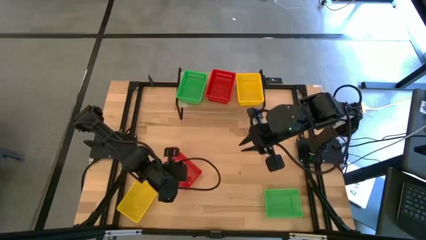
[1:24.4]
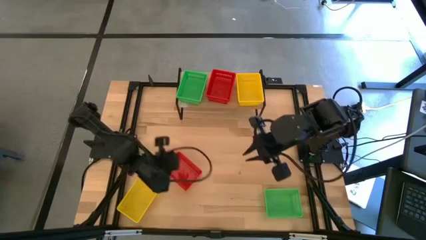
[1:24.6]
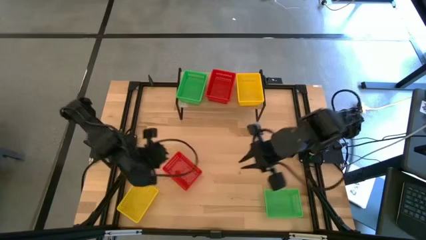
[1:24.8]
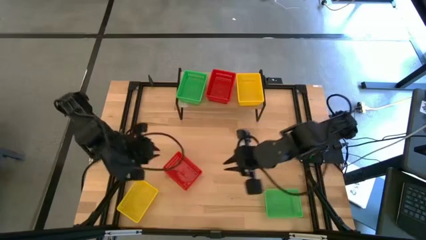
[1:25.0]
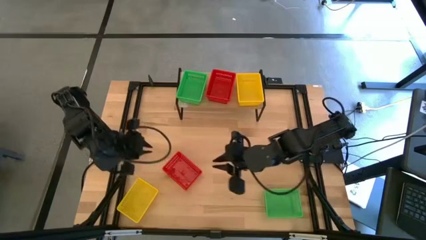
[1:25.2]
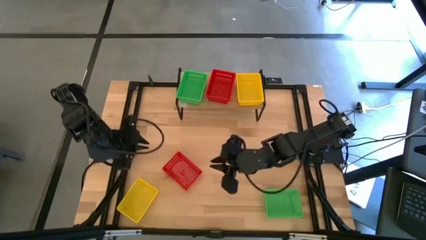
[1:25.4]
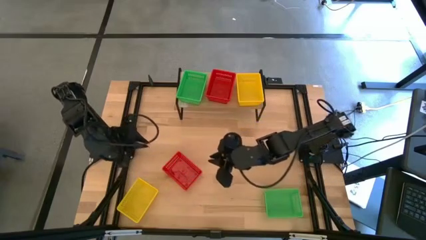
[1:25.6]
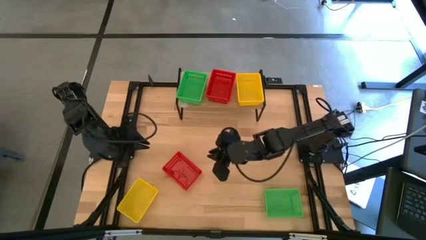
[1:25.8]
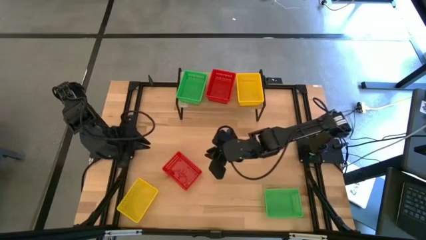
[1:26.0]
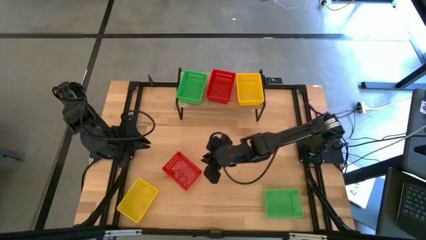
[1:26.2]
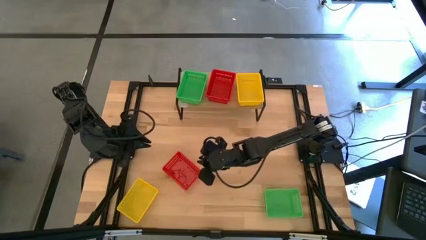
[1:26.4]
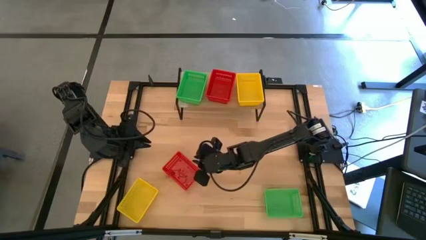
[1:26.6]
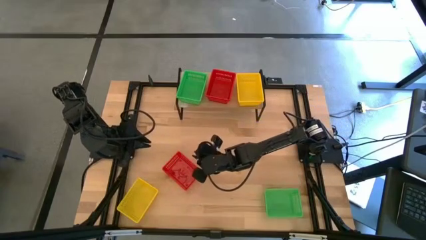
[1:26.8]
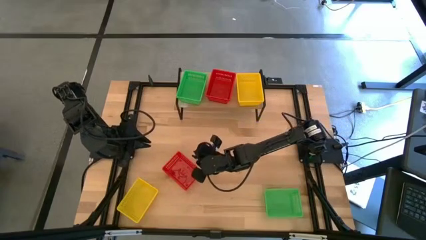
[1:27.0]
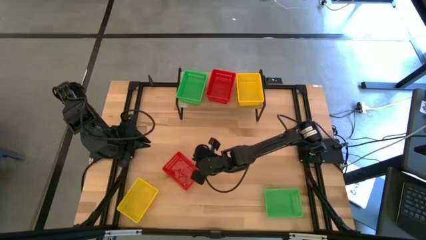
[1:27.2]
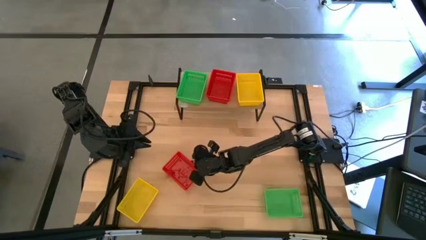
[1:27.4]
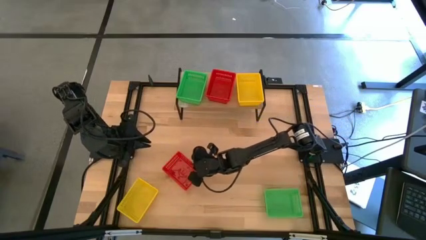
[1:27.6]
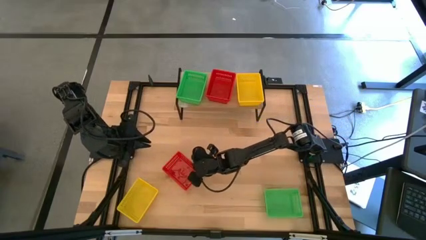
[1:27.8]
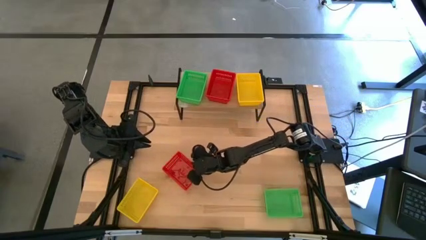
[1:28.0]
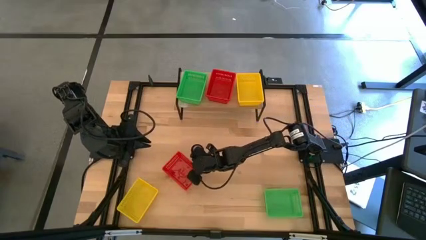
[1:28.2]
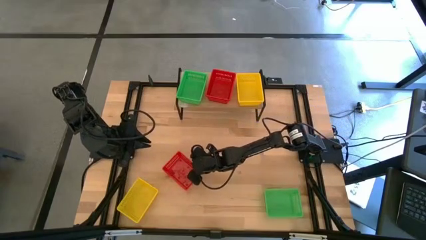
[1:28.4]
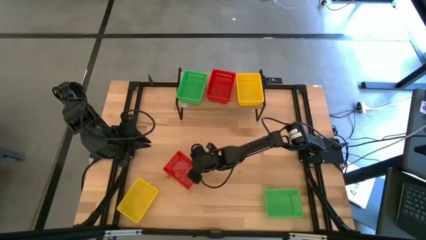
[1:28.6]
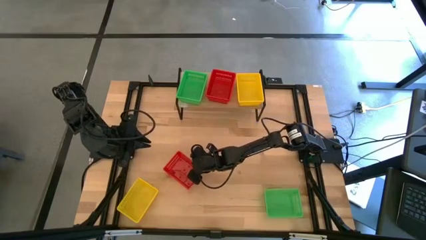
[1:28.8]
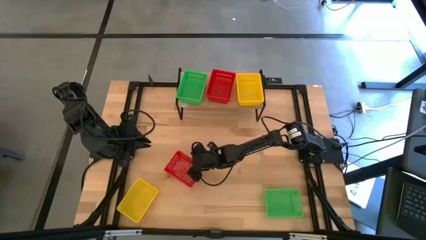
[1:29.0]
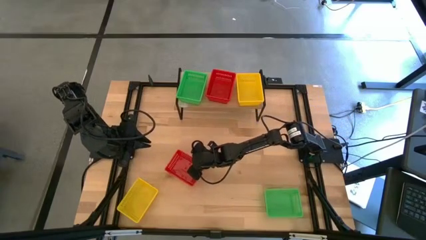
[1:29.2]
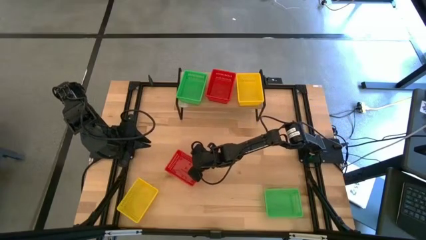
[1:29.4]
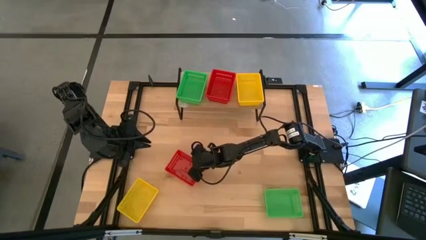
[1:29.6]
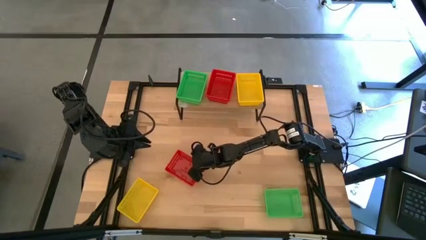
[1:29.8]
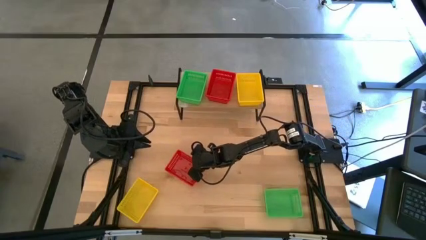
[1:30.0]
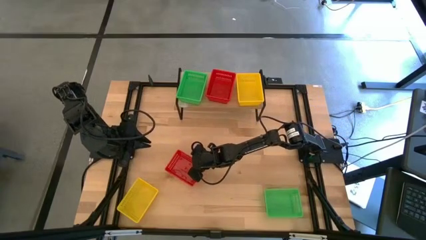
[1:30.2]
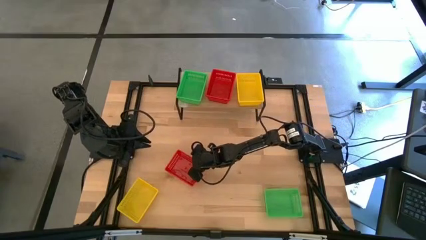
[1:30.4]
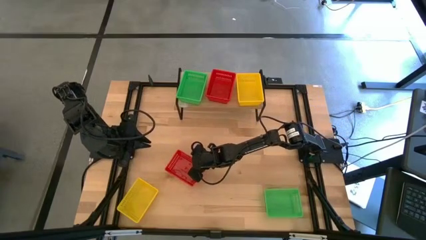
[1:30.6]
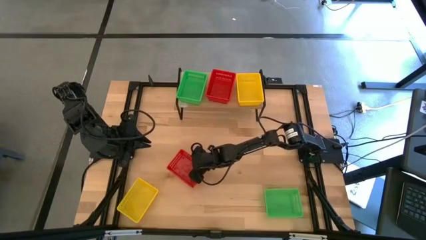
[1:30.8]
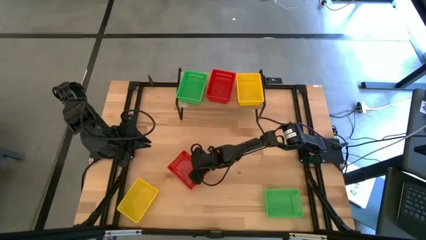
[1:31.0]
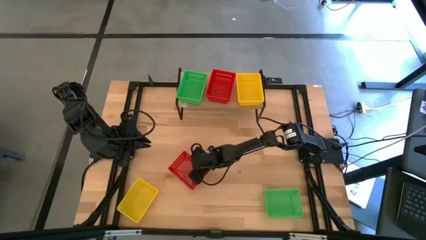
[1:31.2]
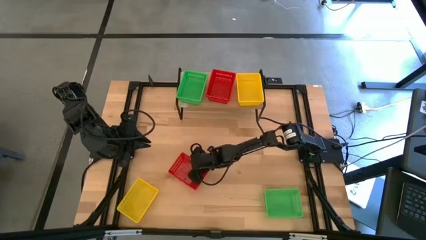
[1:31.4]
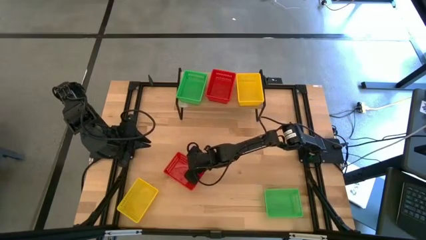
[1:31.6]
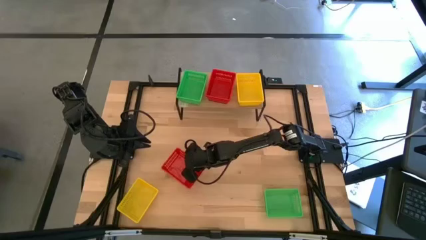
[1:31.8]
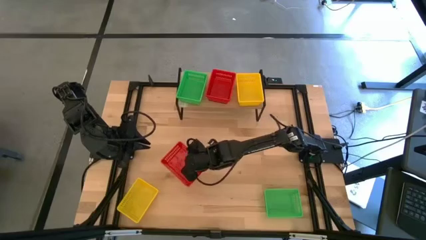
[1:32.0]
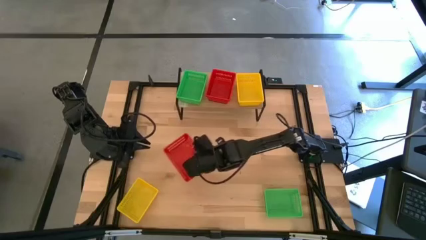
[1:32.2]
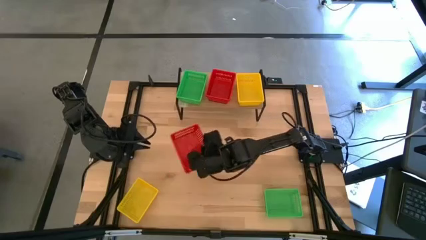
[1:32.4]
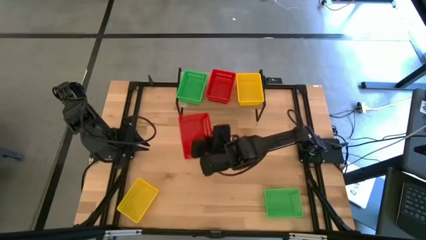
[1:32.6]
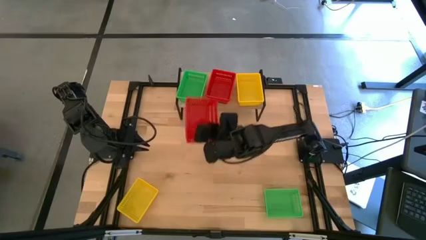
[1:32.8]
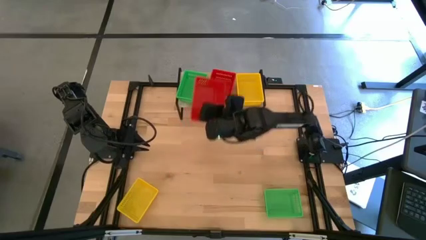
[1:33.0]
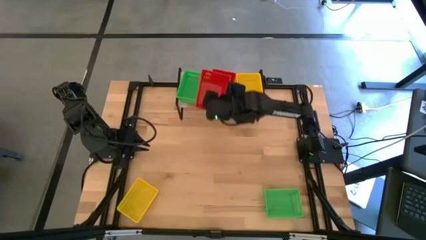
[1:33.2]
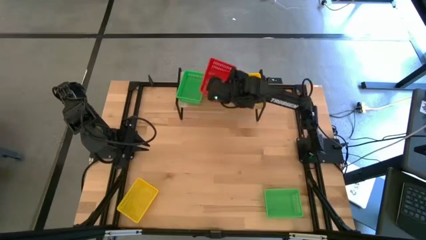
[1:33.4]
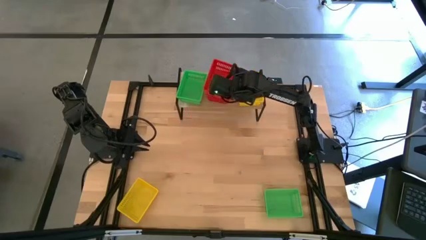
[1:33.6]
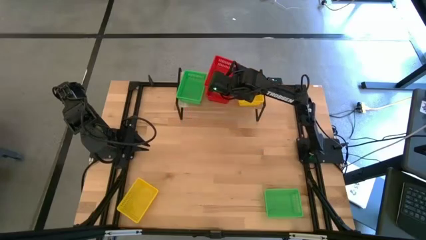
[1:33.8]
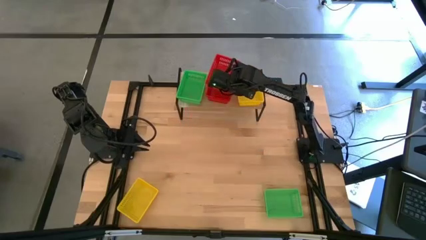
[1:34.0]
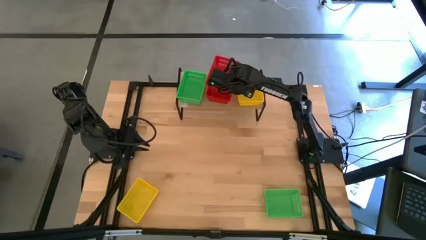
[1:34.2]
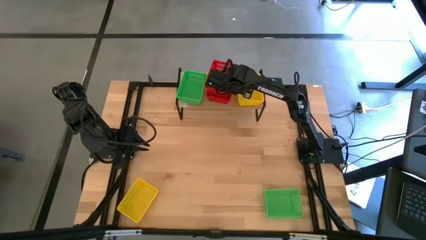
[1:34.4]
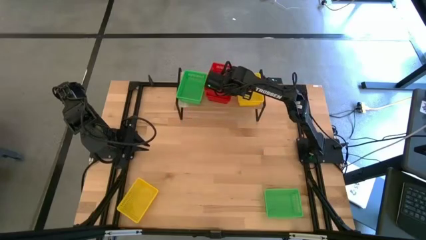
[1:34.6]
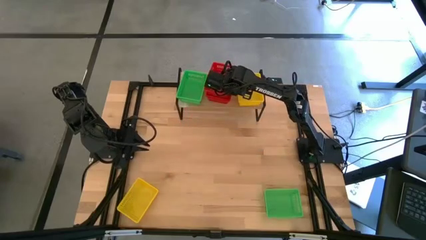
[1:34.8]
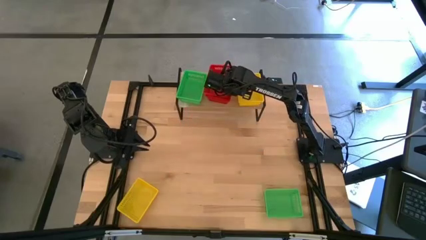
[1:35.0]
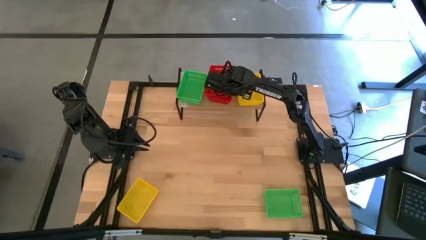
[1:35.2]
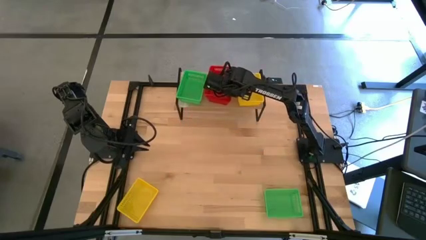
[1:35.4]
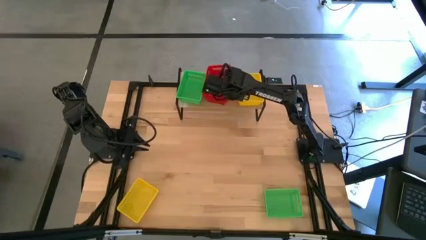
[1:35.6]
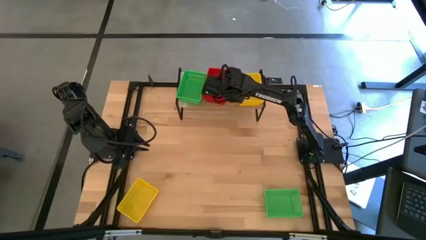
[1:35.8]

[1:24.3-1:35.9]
Task: Stack baskets on shelf by color
Stack the red bin on top of the red bins on the shelf

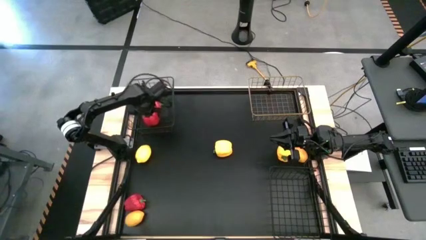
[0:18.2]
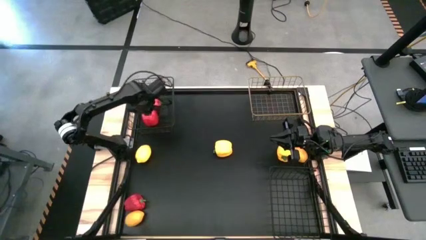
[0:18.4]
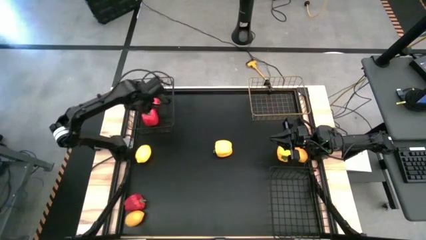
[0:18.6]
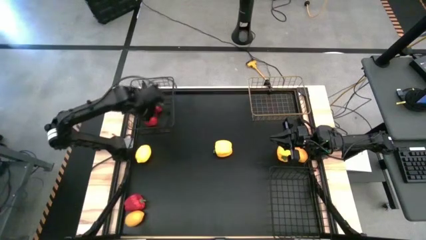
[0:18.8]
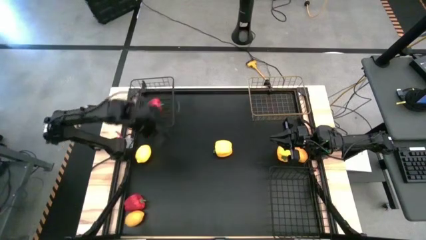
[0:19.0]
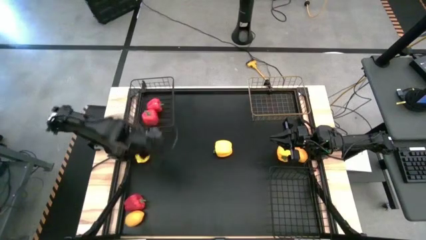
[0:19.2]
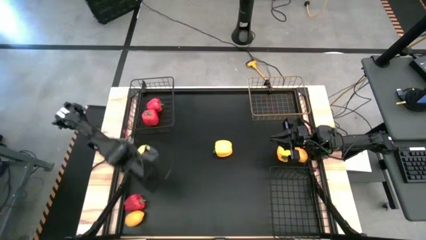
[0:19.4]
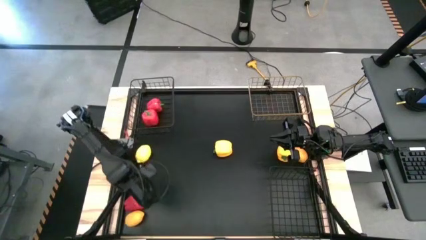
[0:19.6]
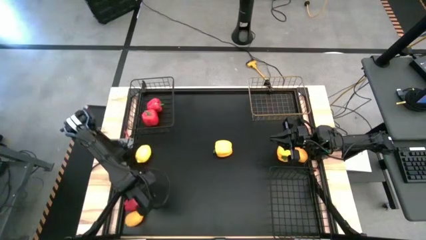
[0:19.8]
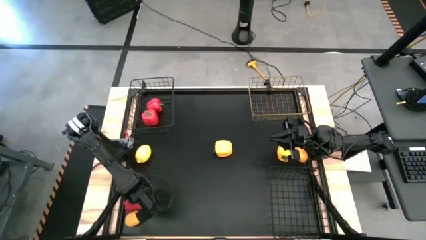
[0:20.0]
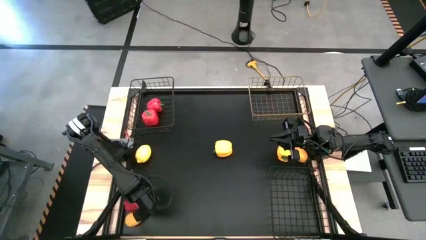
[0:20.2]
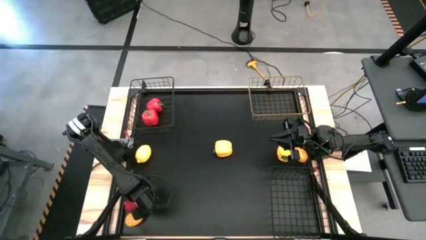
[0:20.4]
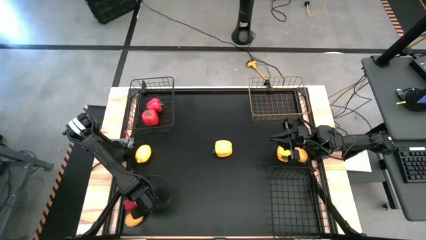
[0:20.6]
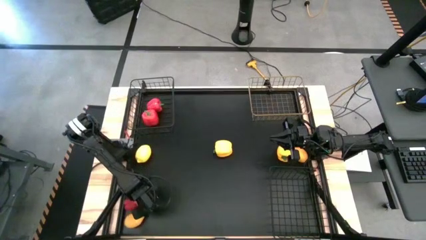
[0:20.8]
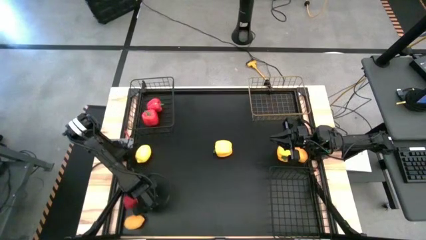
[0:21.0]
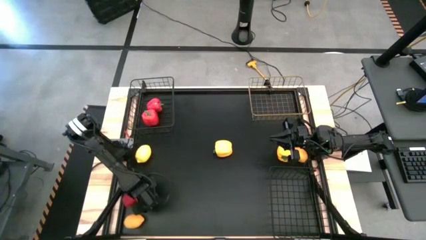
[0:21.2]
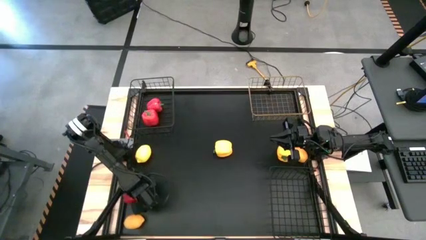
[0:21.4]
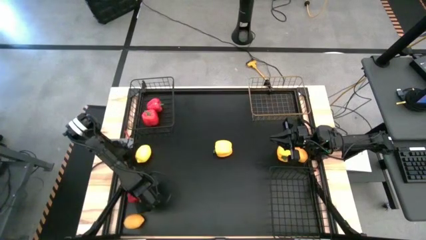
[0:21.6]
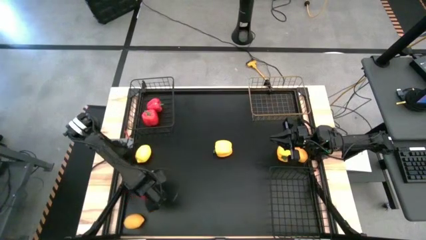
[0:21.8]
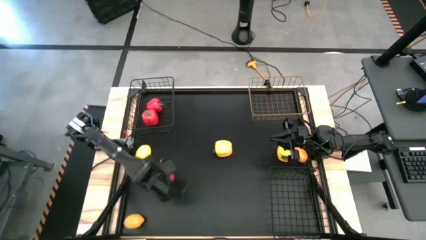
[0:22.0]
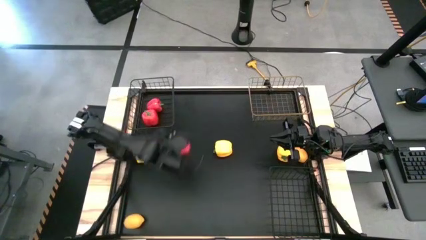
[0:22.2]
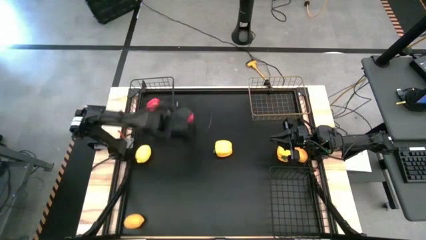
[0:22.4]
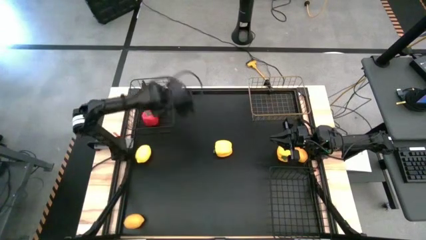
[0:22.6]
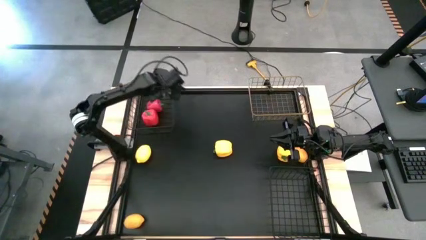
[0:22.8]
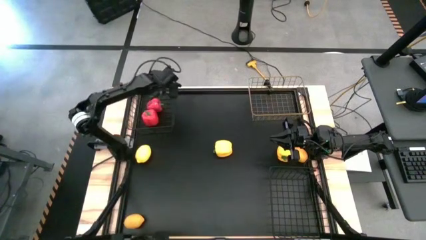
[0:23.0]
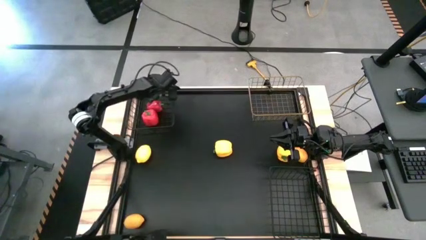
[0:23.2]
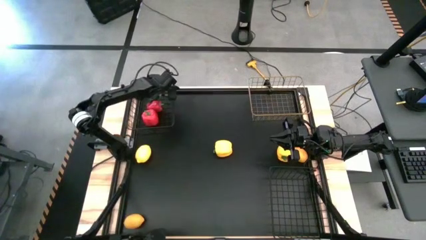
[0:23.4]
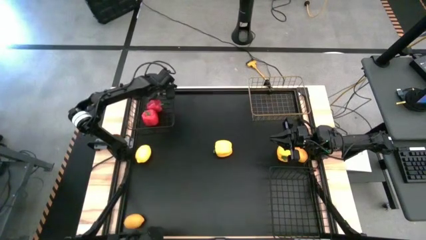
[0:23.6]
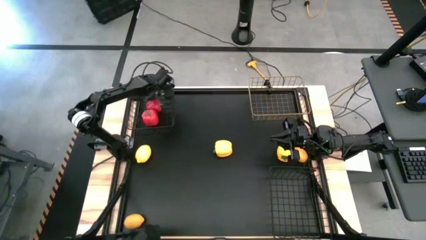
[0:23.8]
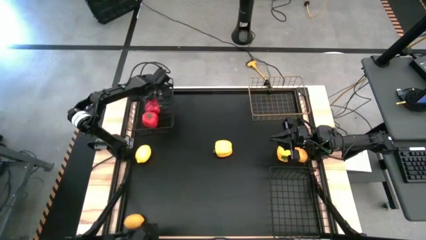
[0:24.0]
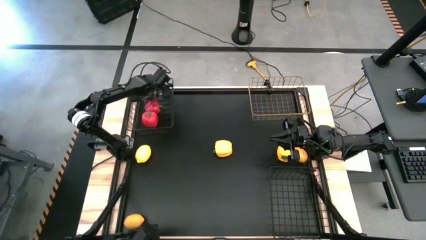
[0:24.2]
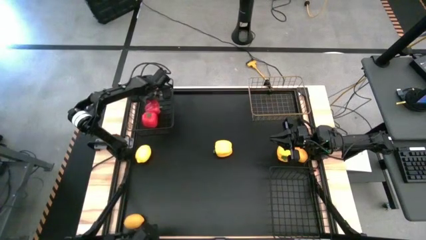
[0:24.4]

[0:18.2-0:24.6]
Task: Sort produce into baskets
Put the red bell pepper into the top black mesh basket
